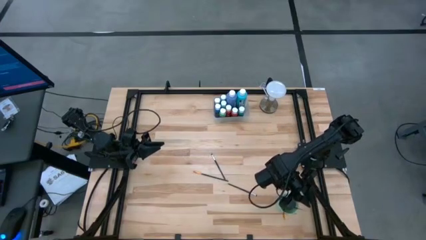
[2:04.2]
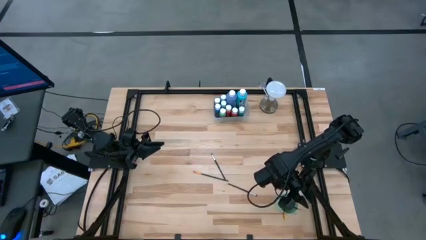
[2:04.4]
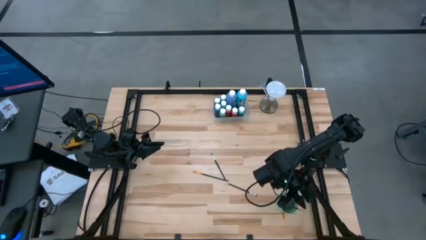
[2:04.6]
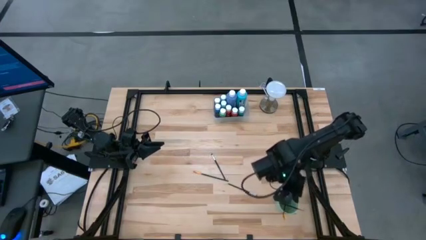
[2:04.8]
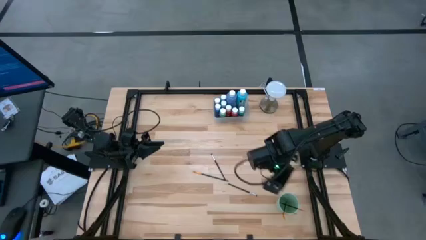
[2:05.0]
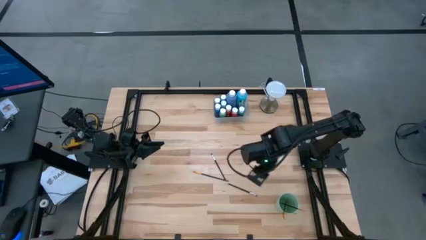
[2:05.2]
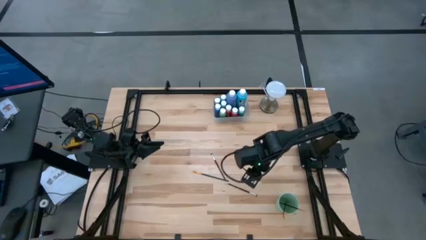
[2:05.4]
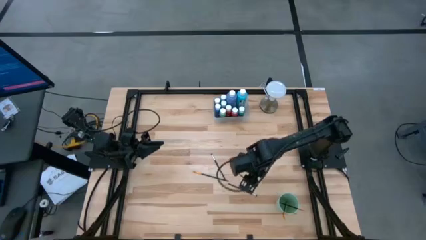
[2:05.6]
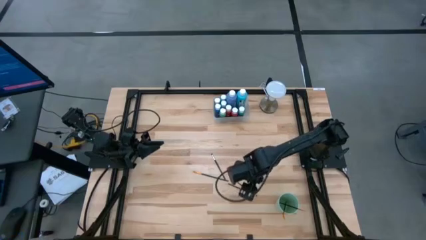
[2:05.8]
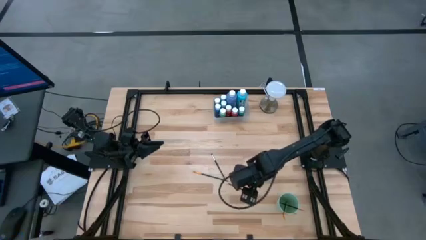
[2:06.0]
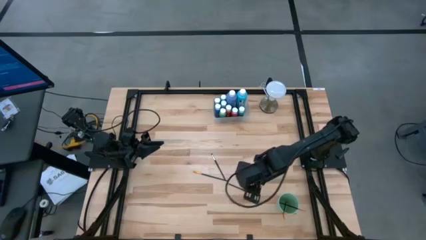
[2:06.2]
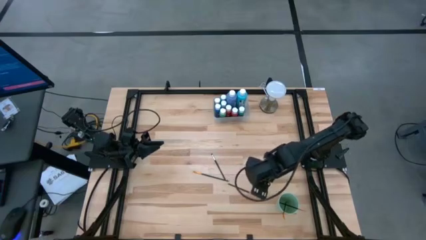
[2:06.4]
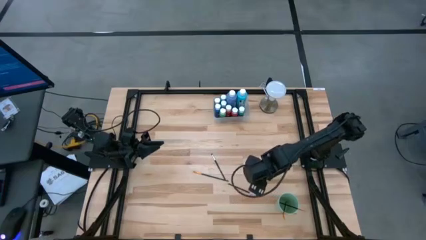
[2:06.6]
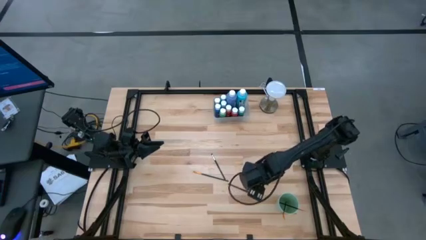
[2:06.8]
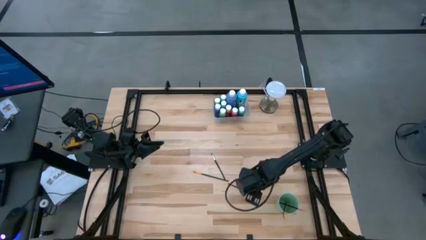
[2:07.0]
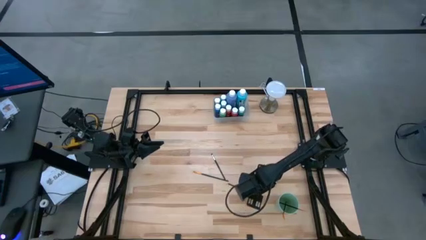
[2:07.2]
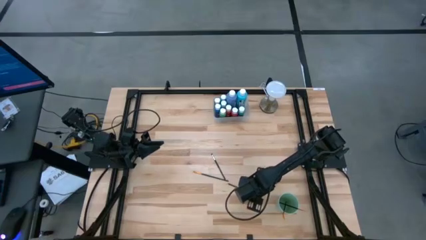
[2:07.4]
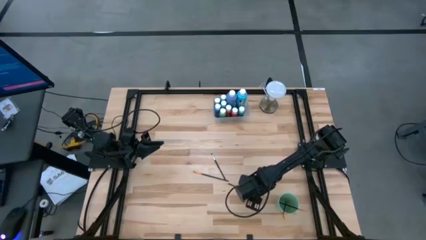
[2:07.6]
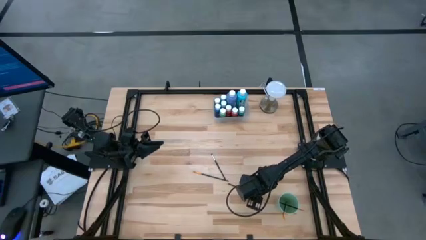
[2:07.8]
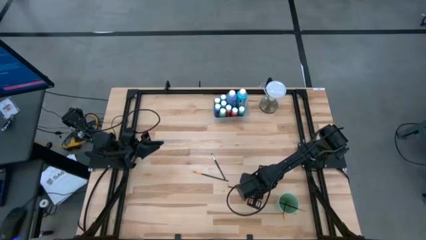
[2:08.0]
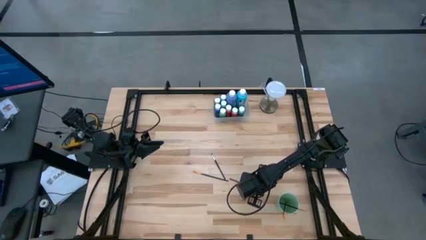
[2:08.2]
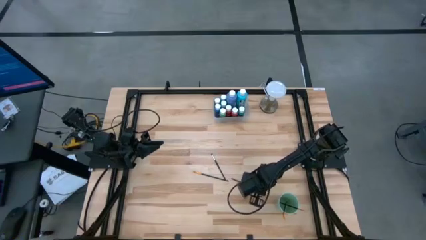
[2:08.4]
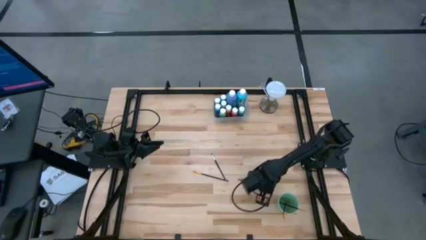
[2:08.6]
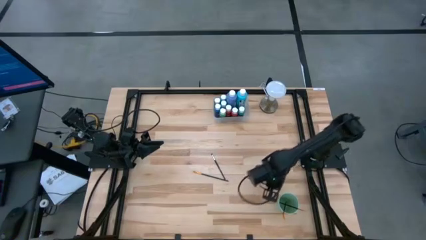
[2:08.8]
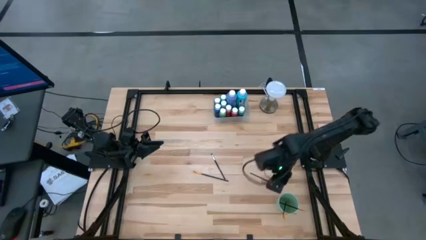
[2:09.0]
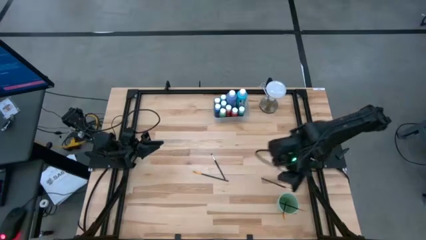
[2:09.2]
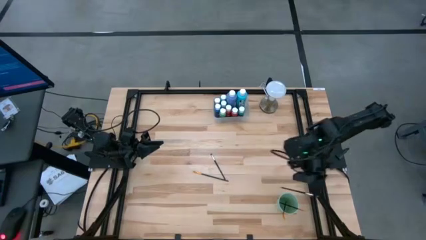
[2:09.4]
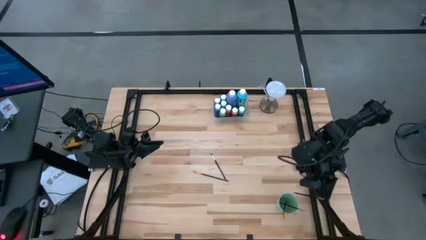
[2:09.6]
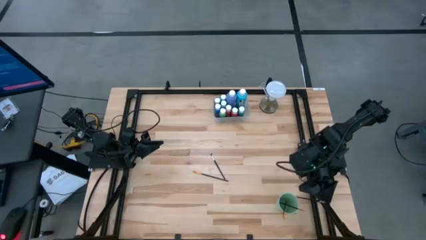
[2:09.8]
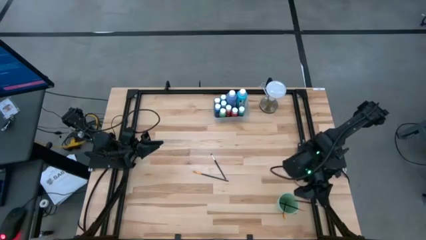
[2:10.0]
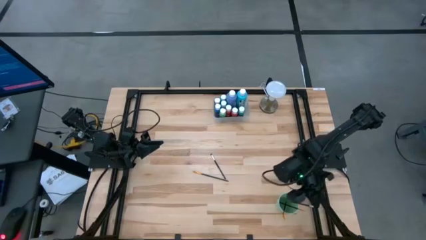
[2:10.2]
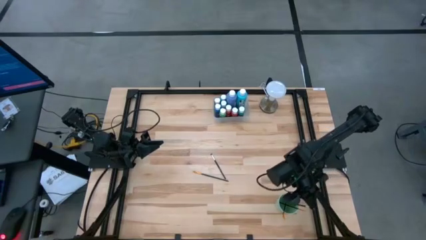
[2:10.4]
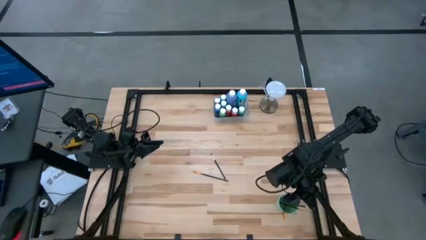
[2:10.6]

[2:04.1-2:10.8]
Task: Pick & Place Paint Supplies
Put the silver paintbrush into the green cup

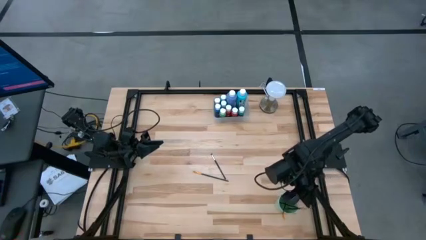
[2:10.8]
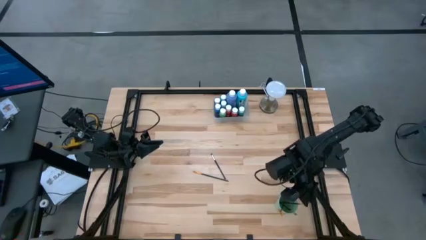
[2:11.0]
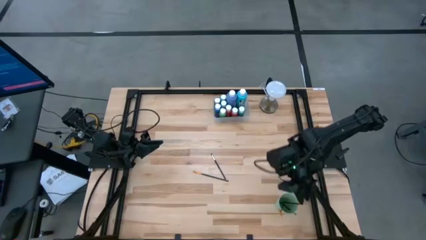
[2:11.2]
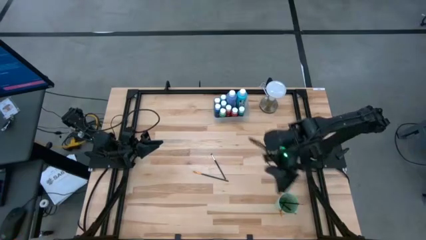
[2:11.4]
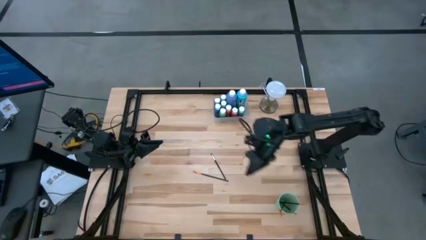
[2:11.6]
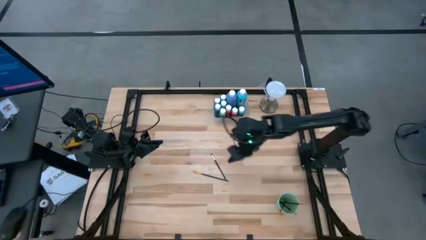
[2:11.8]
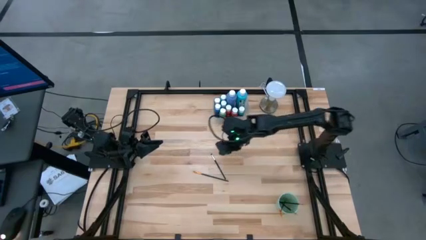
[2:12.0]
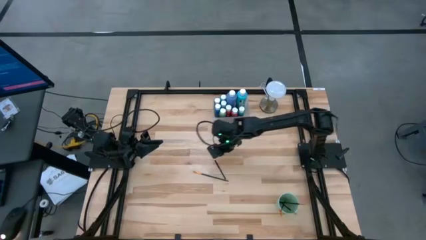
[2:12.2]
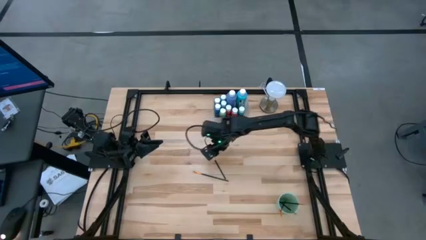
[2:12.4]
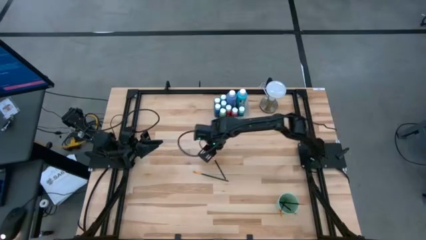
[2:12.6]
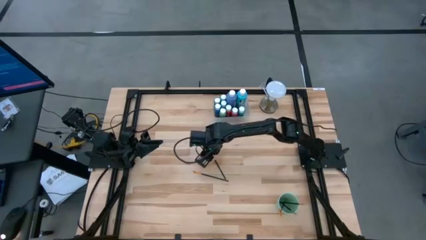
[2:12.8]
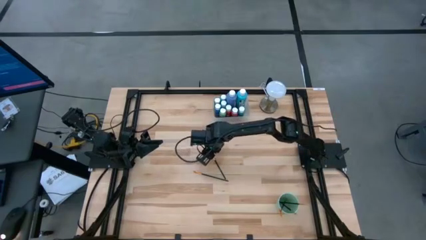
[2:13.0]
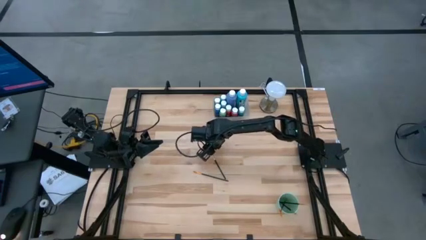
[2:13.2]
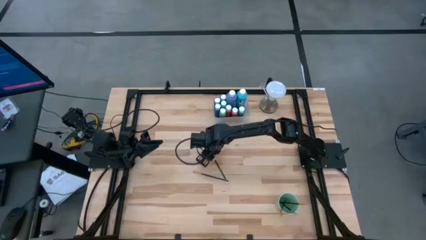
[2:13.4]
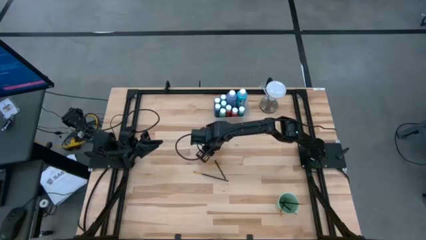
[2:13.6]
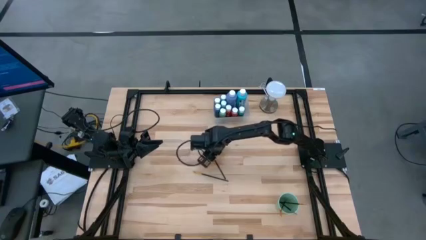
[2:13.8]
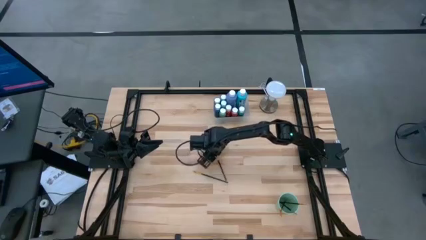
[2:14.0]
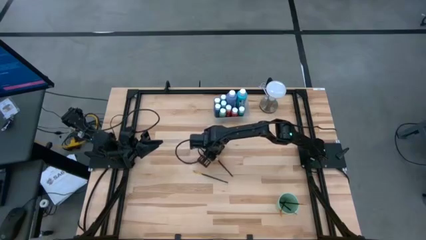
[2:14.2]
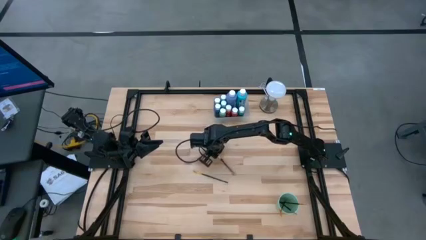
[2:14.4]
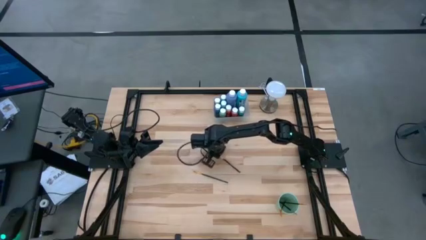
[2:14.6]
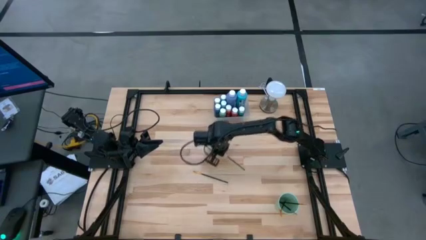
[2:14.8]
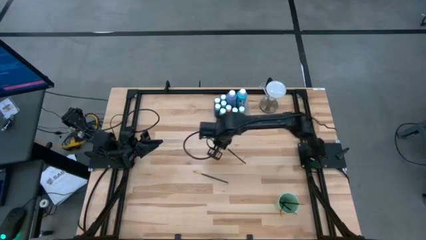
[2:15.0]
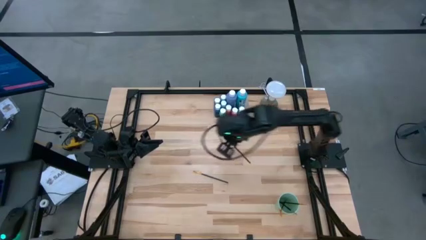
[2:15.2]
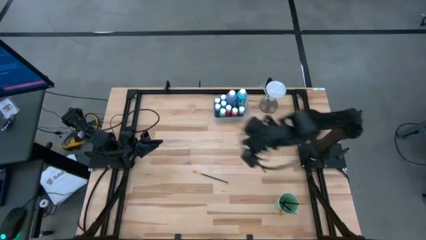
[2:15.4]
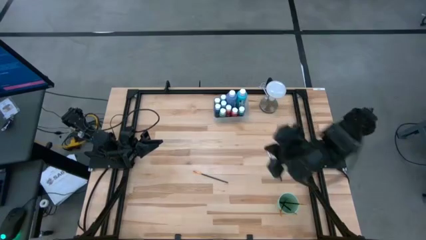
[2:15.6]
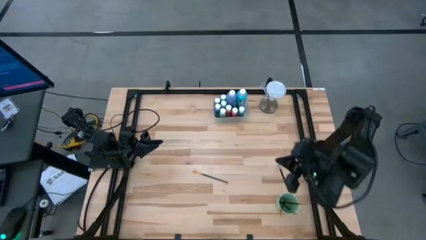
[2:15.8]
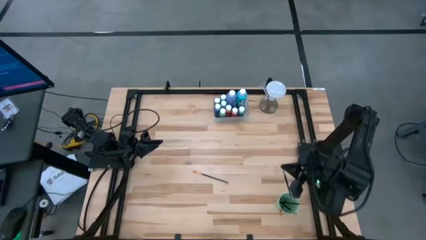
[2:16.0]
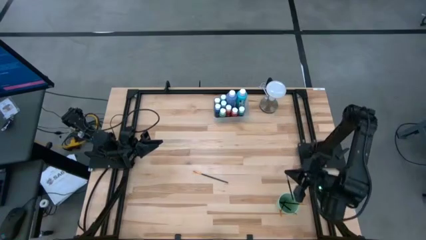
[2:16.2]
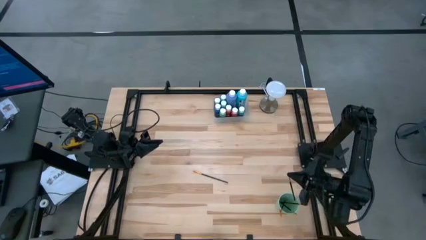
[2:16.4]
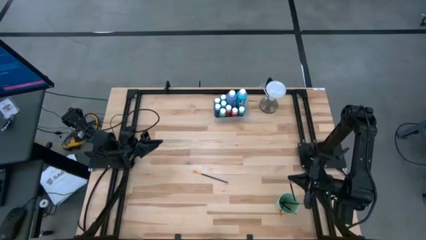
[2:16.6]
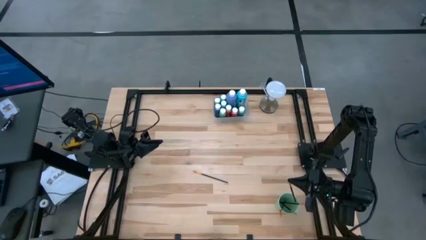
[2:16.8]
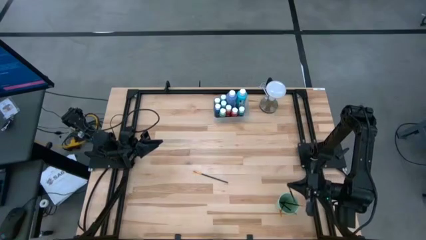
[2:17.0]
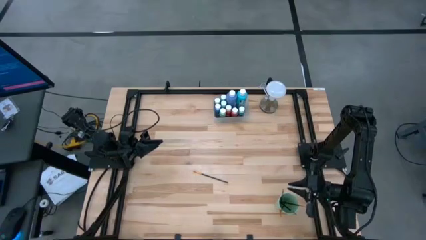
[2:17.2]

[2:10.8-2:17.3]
Put the silver paintbrush into the green cup

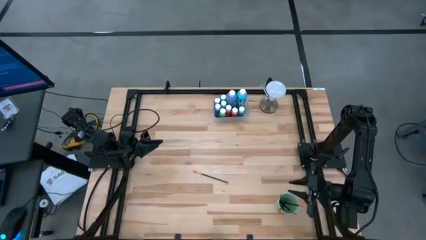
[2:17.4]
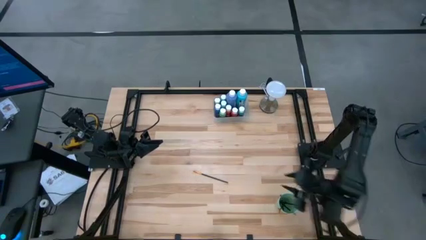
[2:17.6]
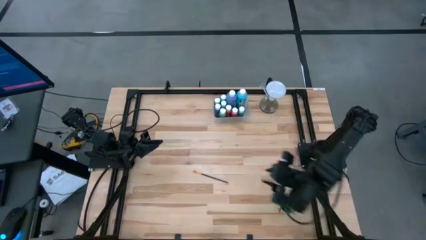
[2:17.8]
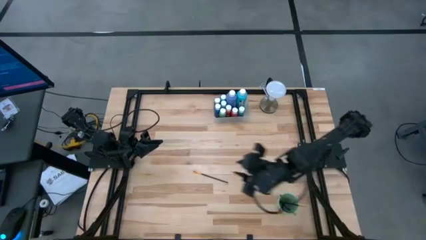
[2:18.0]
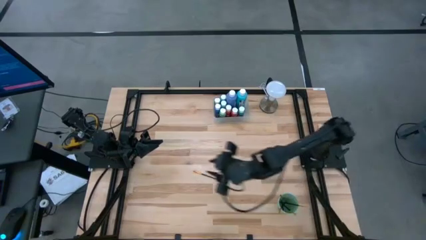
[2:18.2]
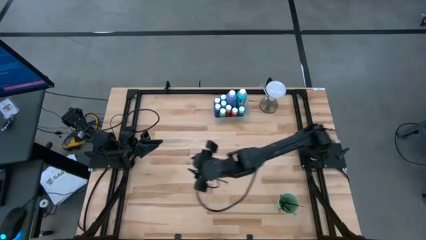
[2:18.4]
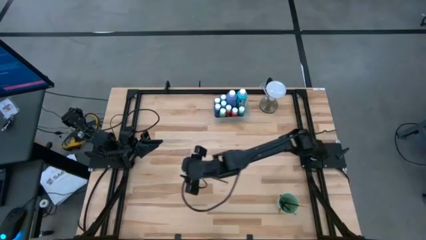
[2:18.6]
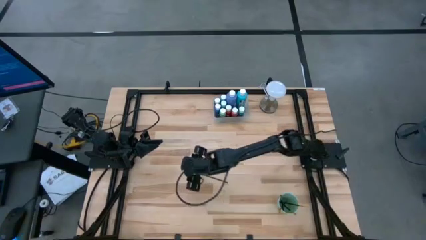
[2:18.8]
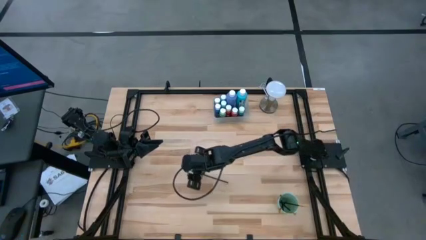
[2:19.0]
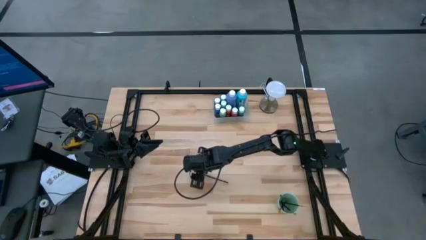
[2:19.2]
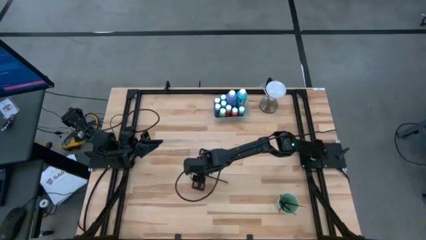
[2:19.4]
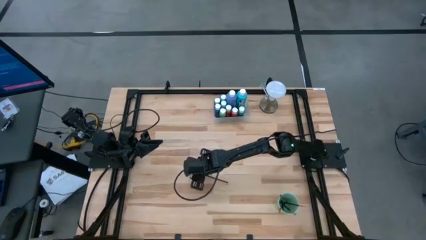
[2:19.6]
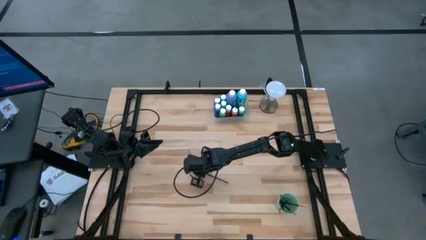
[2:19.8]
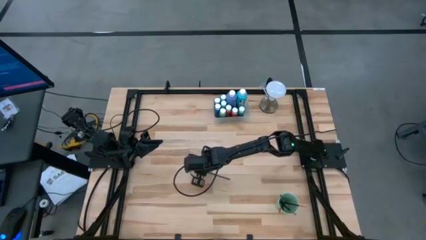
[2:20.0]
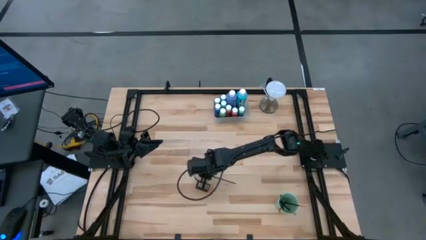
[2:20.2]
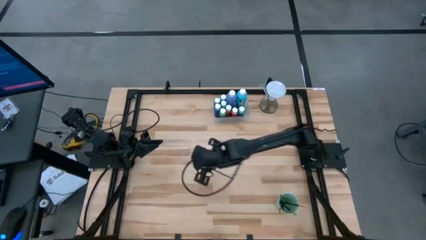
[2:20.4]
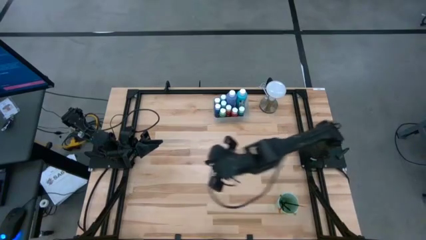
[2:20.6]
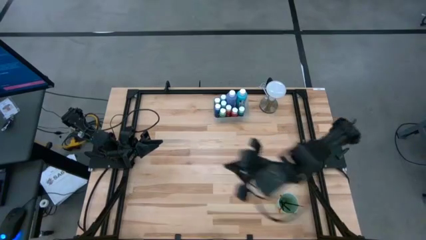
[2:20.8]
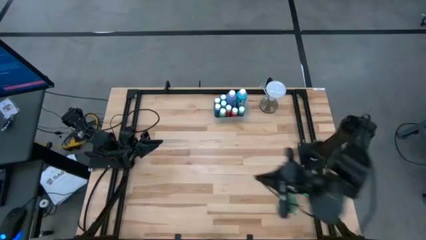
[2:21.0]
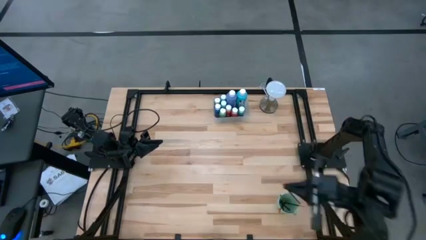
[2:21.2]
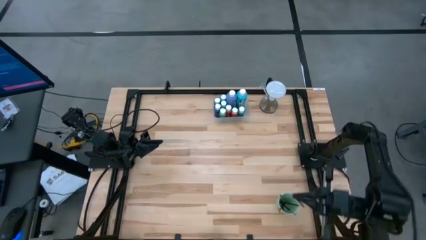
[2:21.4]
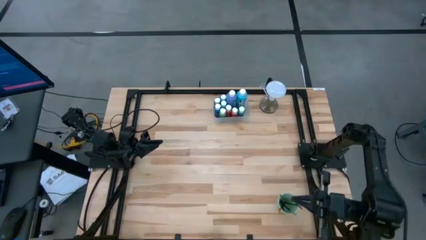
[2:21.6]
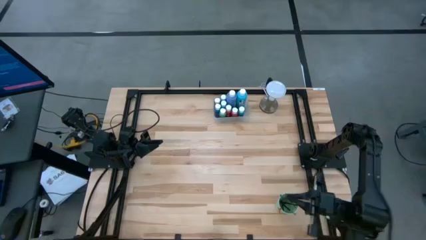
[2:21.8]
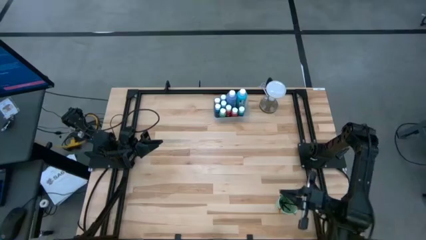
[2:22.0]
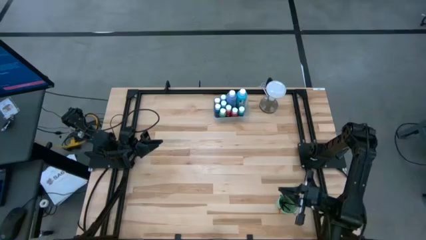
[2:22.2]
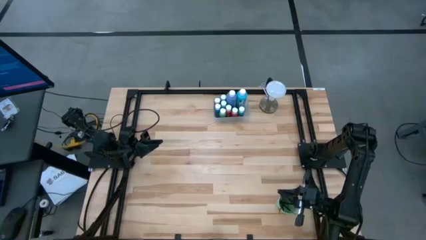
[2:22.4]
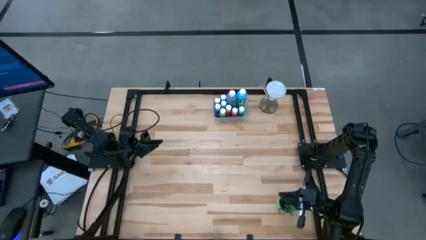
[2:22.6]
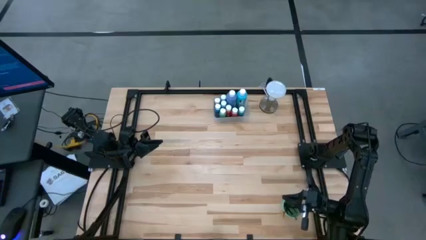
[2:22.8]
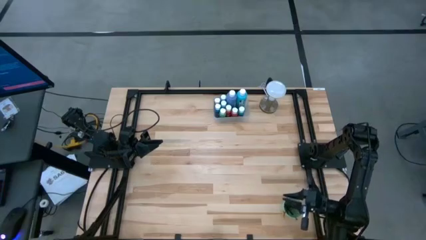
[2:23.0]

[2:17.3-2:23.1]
Put the orange paintbrush into the green cup
